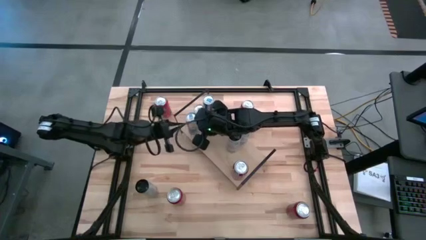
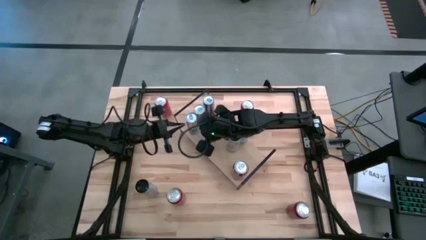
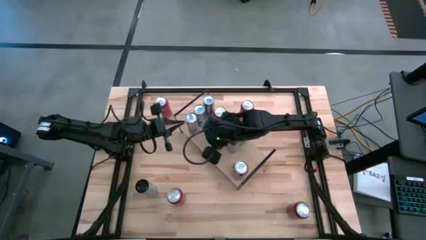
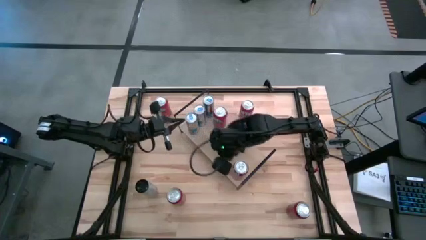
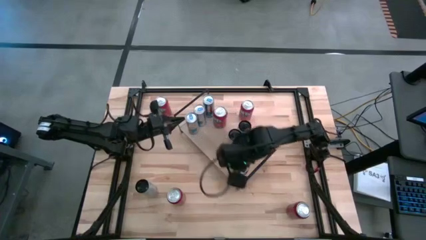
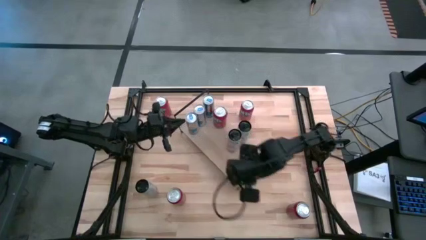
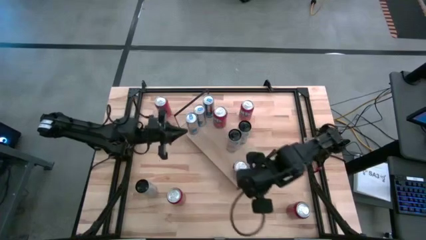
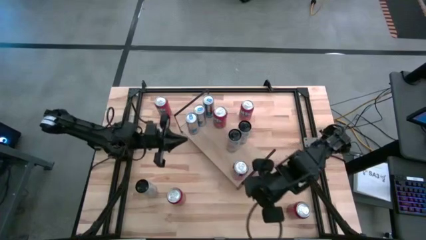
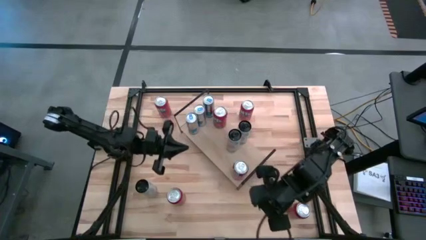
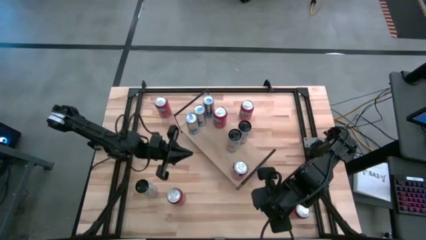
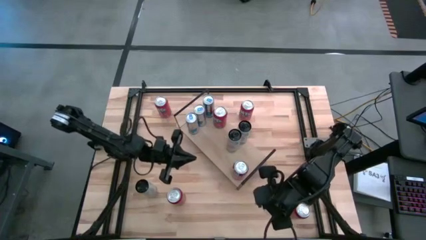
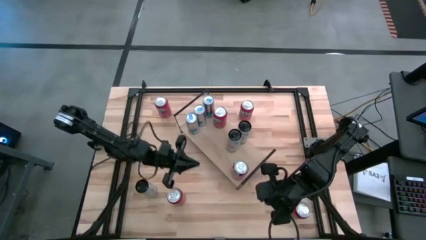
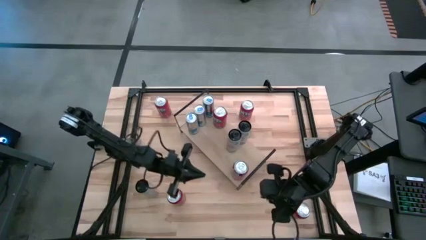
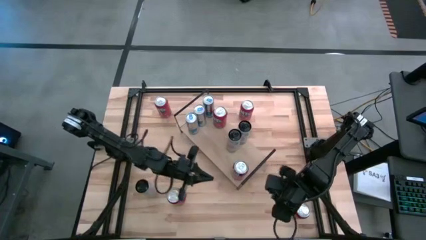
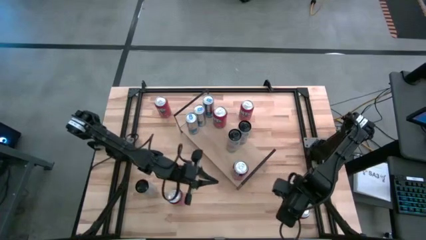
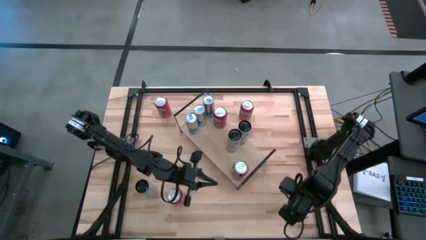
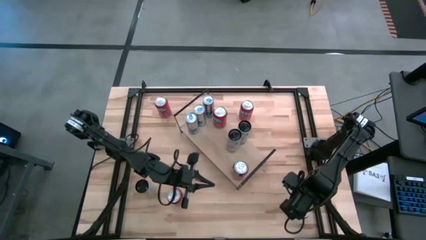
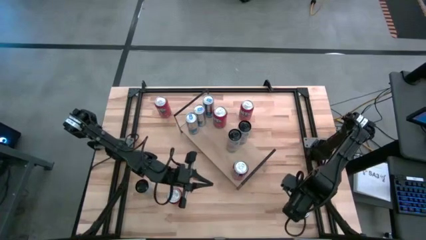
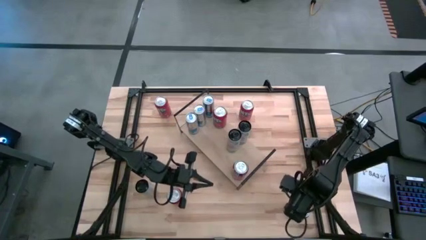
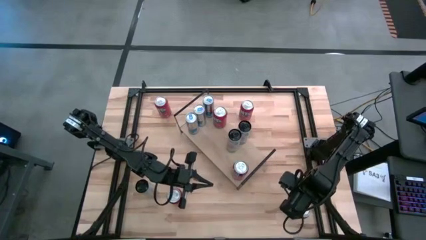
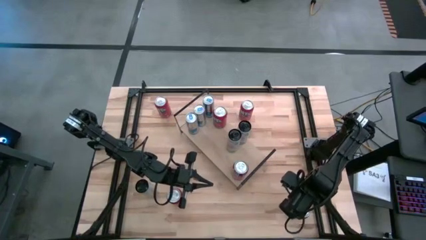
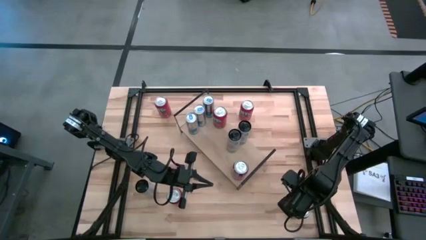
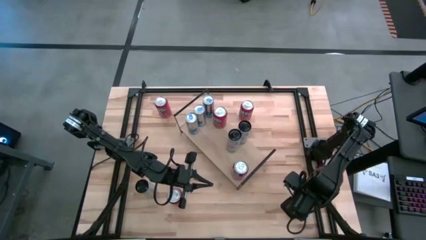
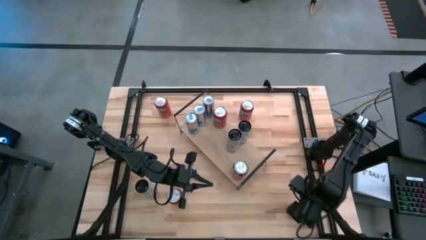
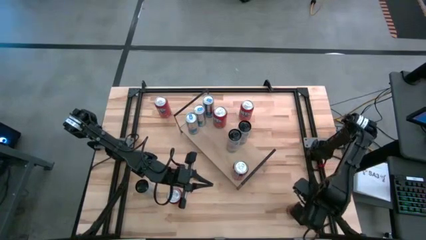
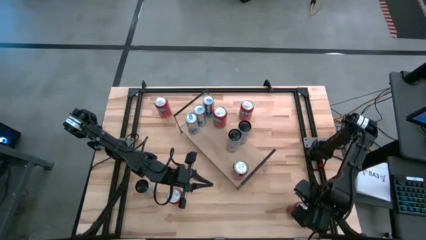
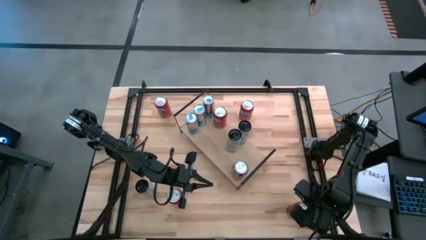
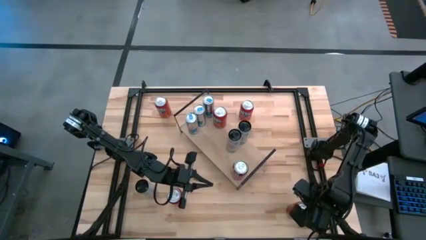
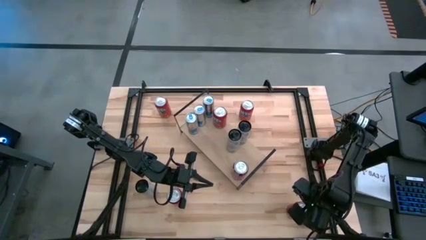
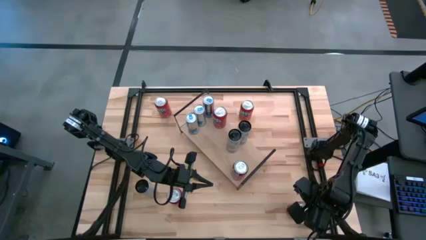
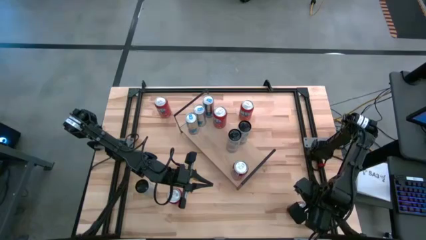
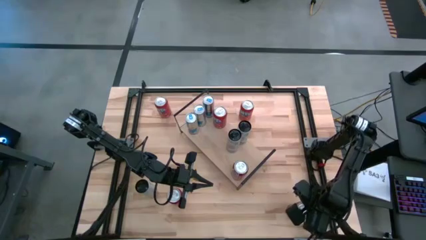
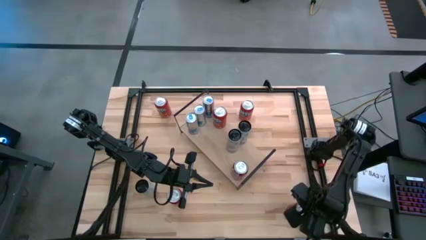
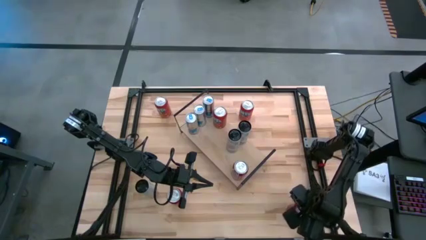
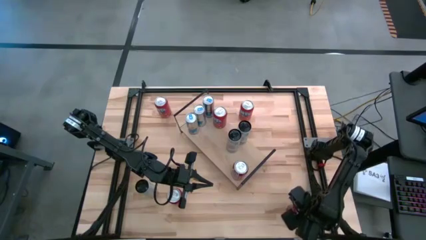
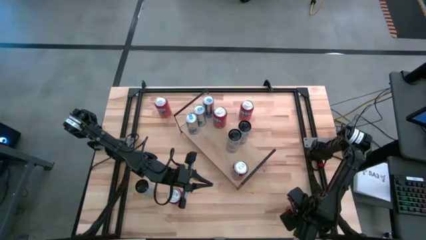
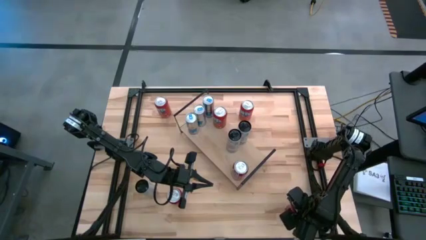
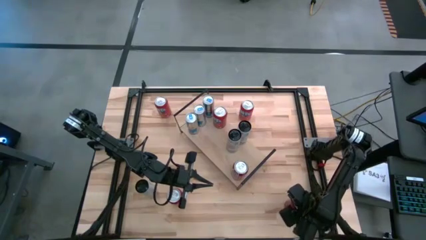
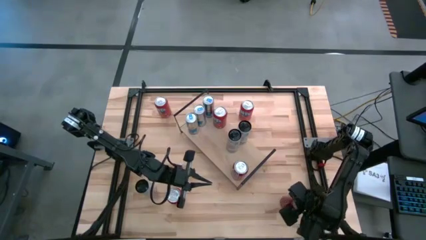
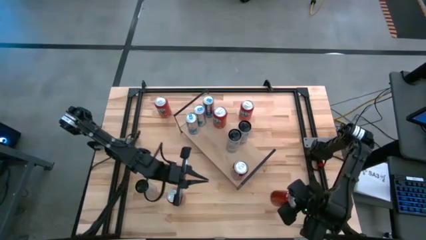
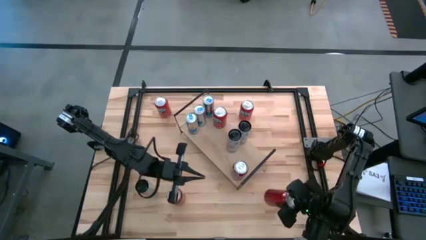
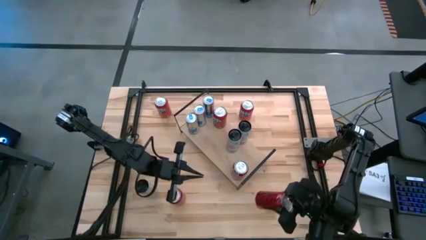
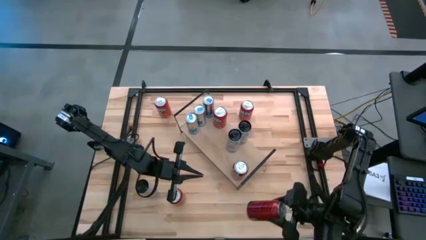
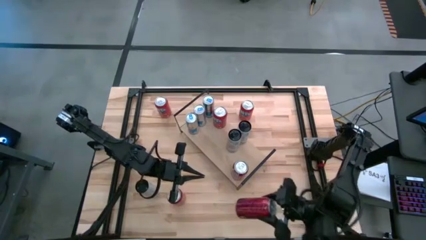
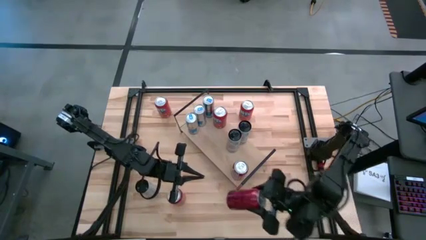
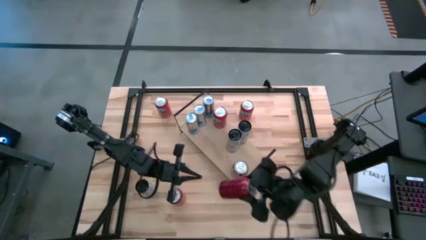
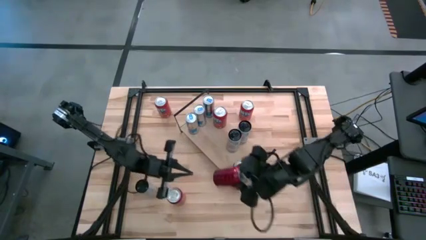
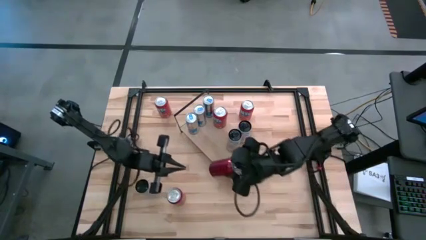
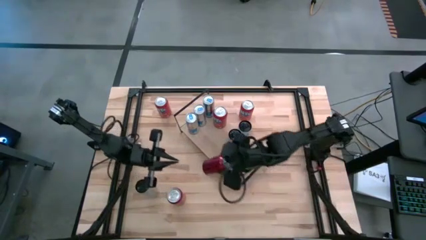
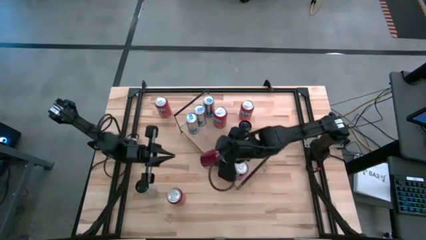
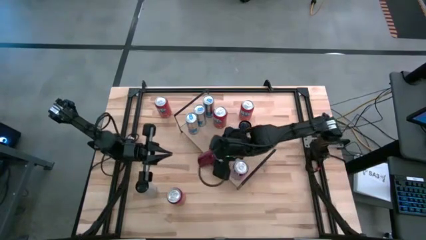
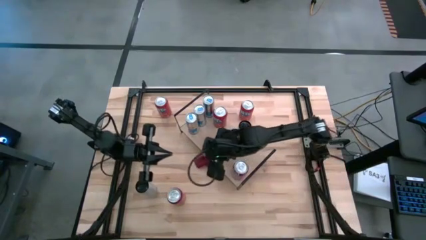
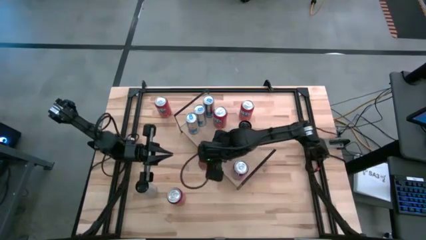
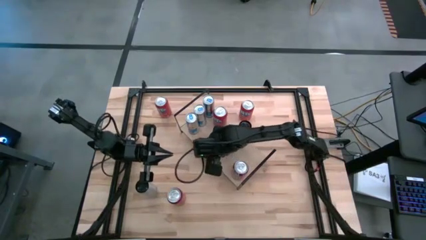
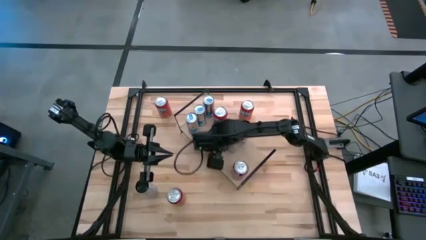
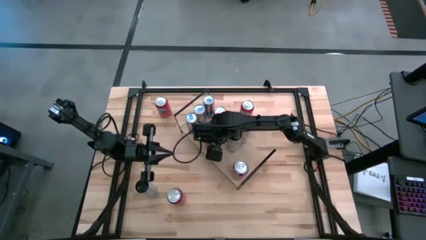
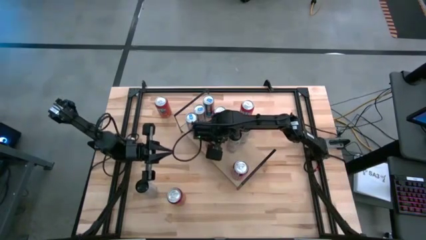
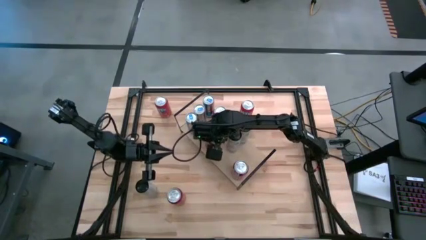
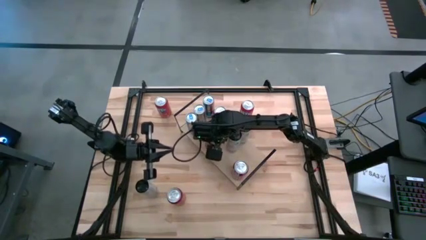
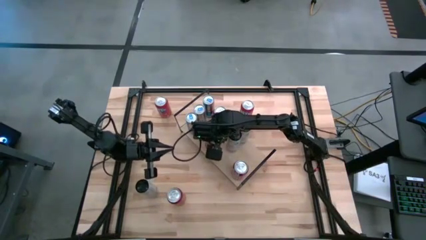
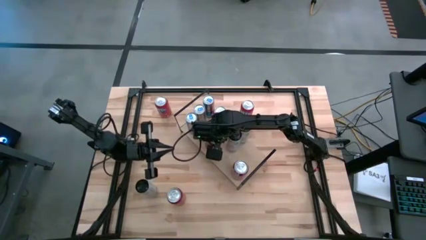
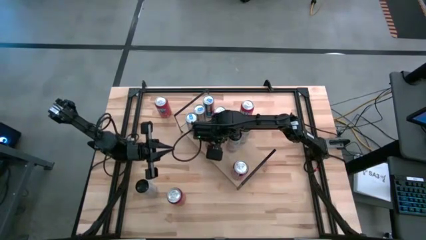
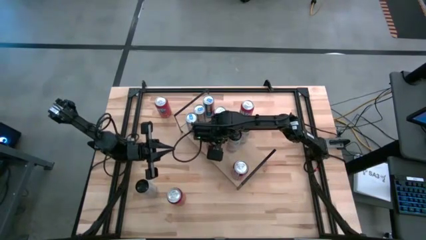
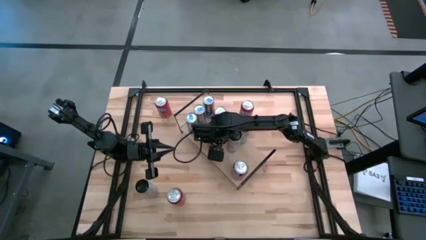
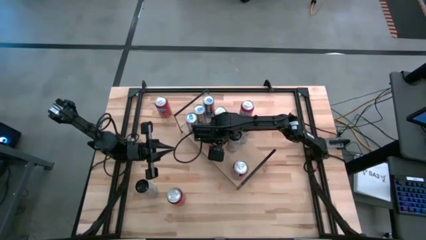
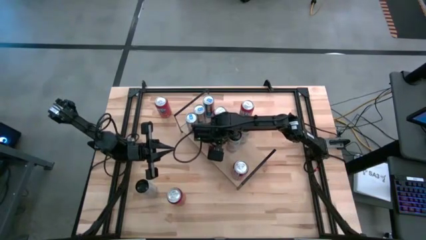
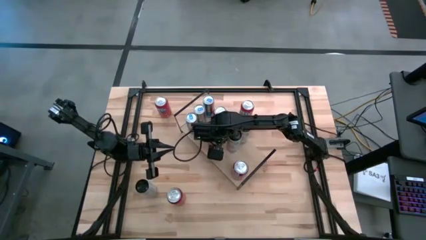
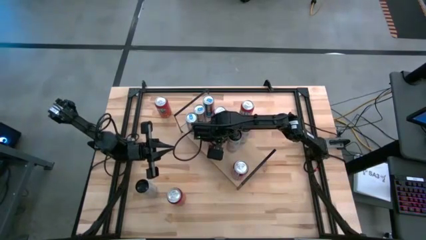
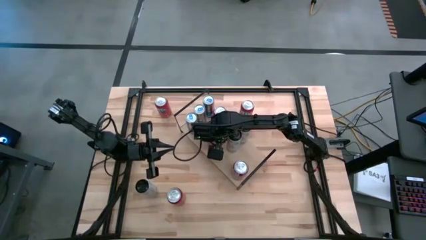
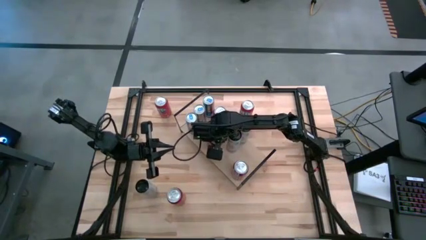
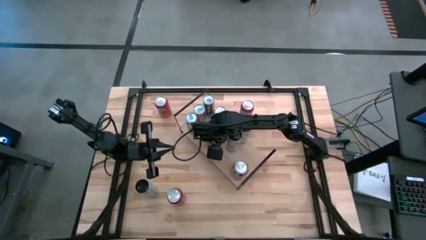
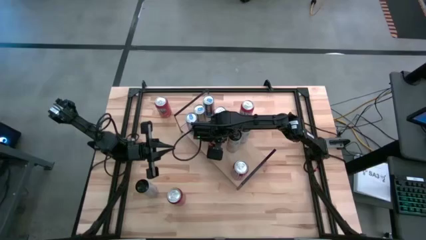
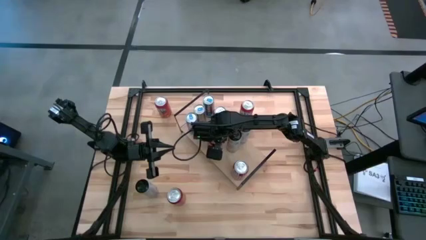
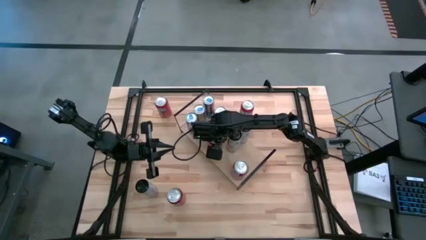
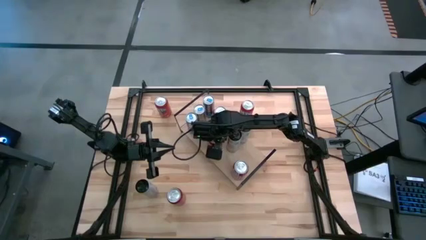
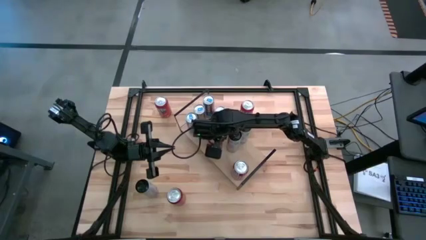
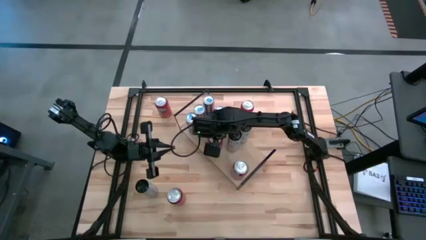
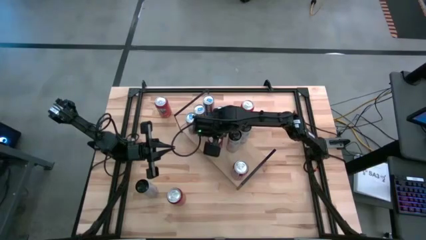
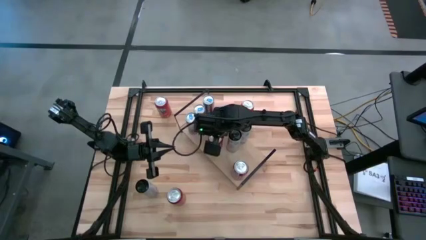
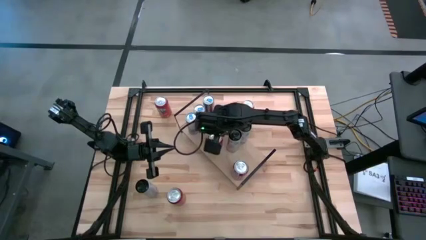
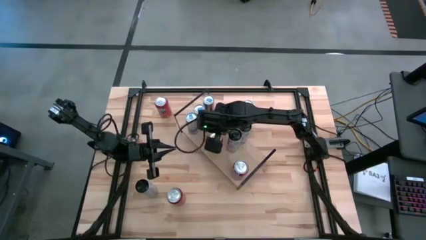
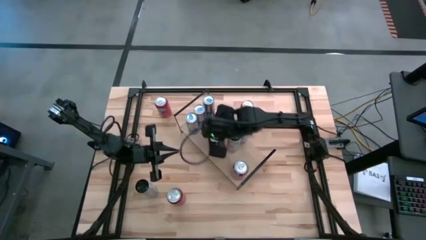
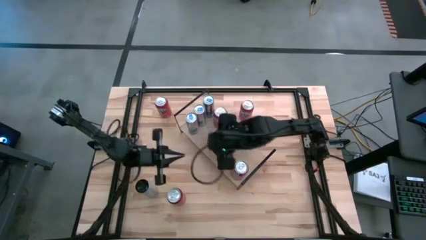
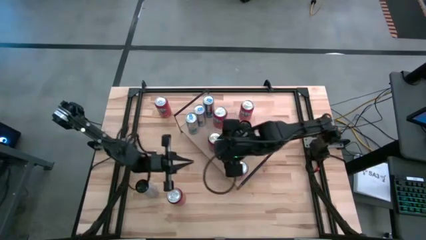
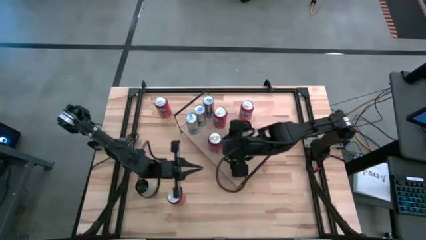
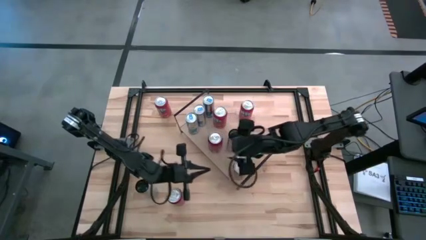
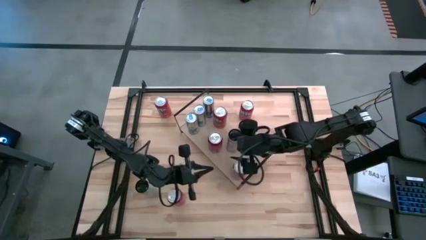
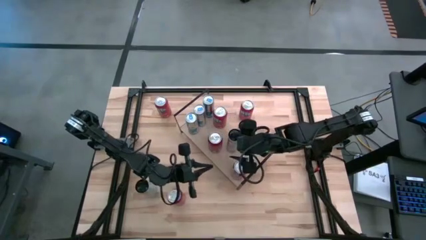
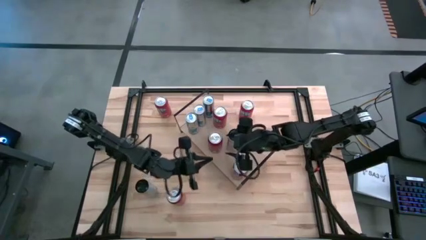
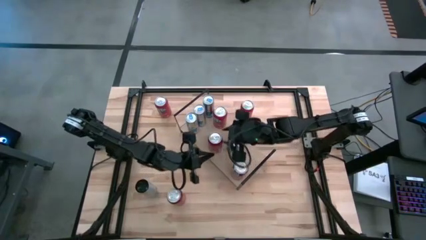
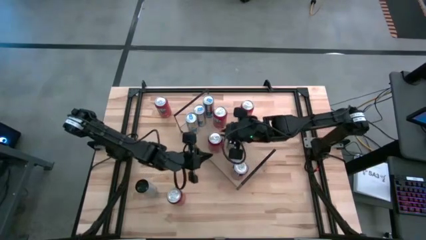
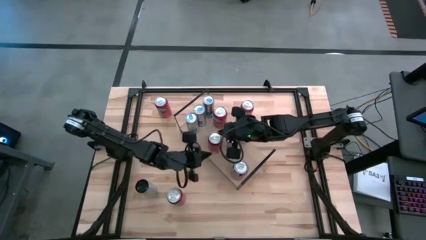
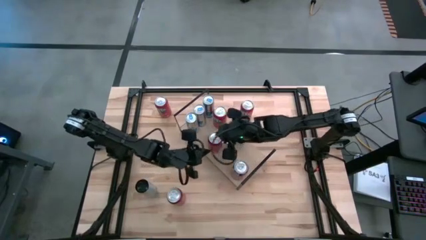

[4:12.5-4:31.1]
Task: Place canned beverage on shelf
Put the right soda can on the shelf
